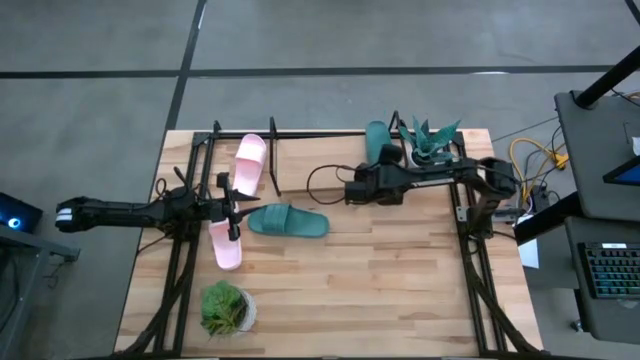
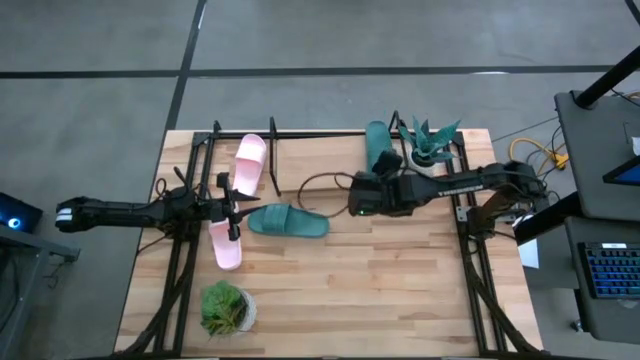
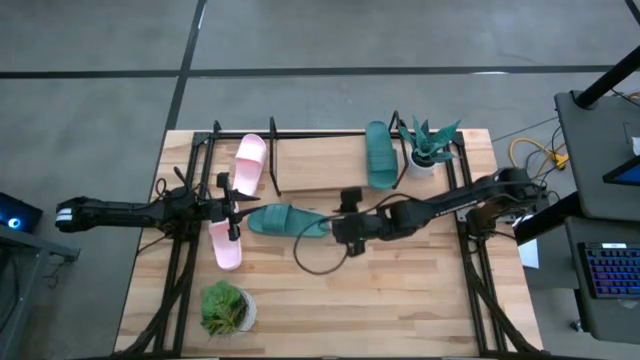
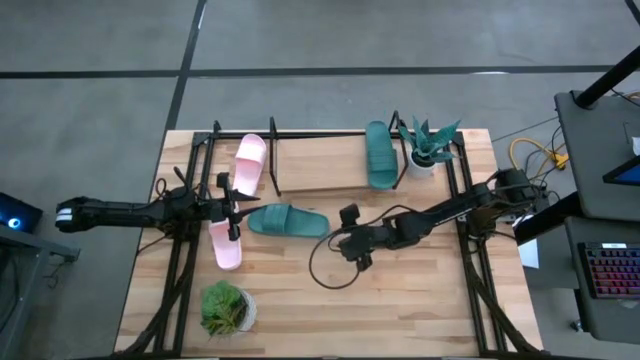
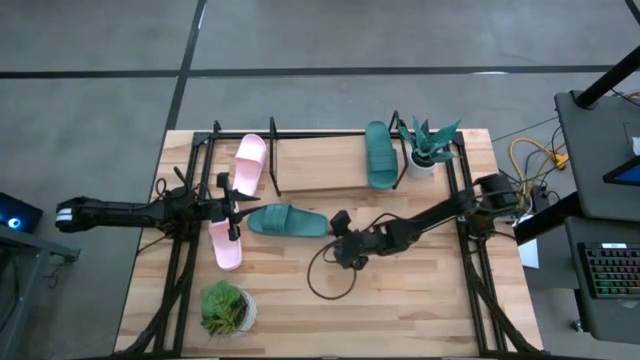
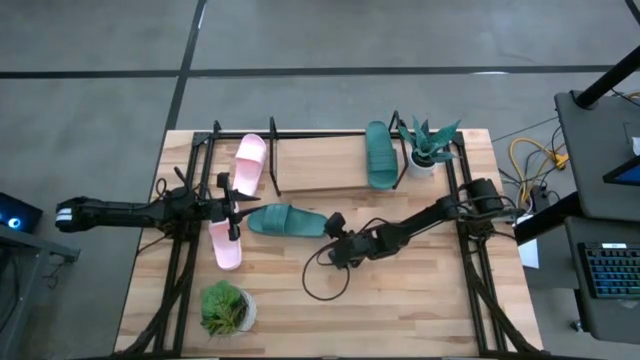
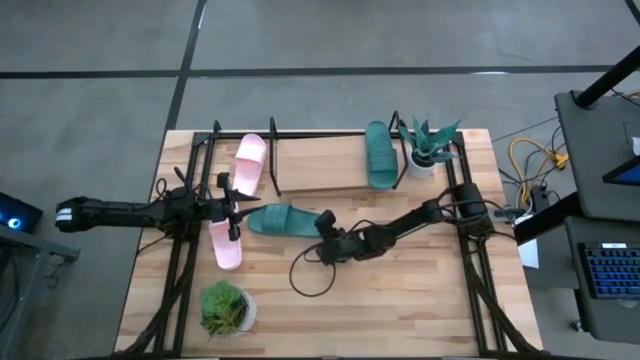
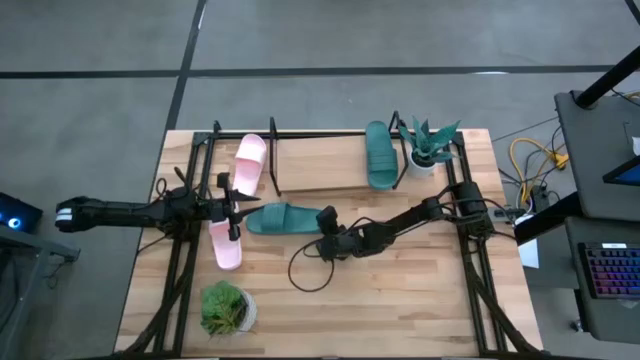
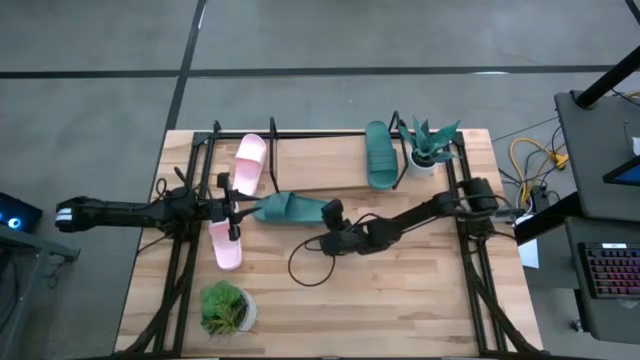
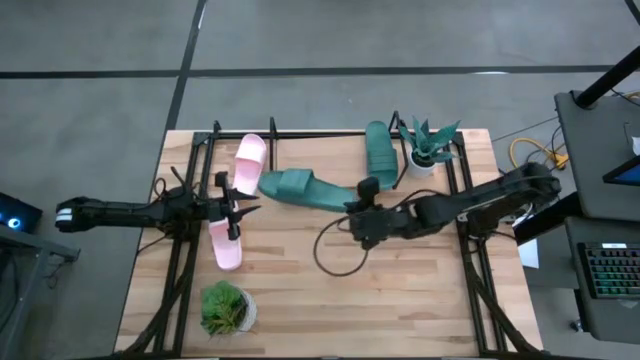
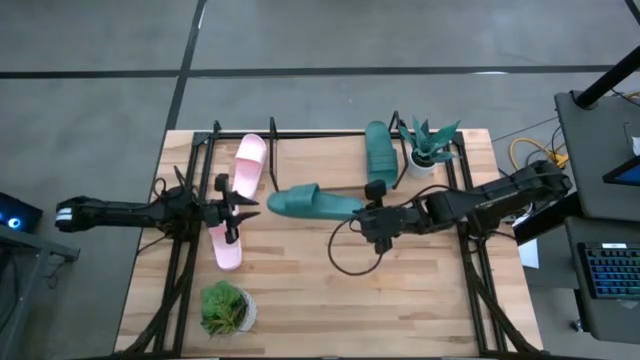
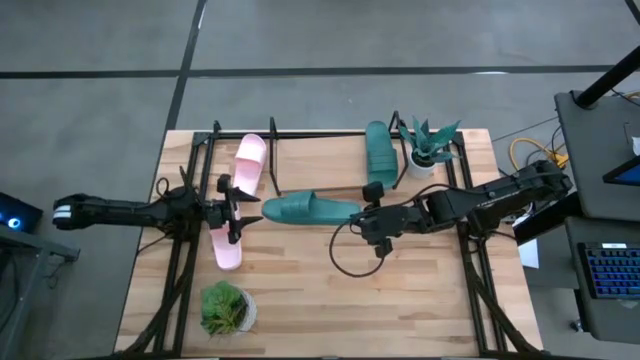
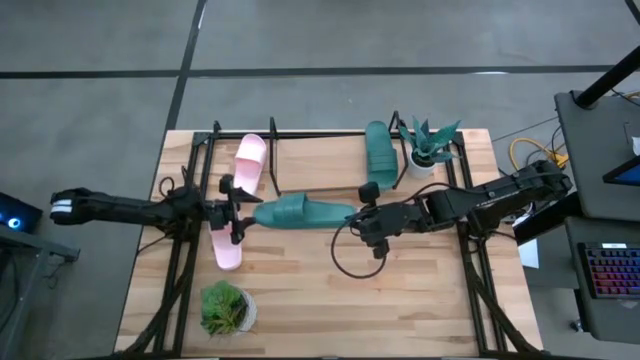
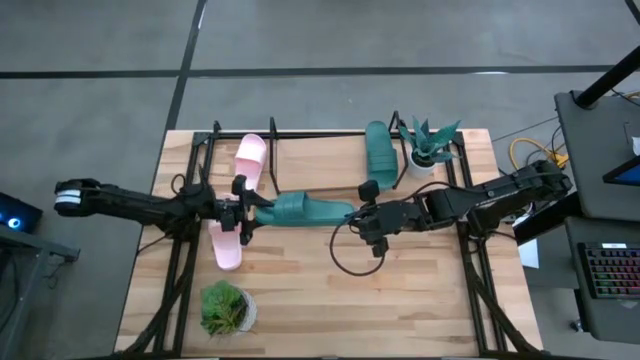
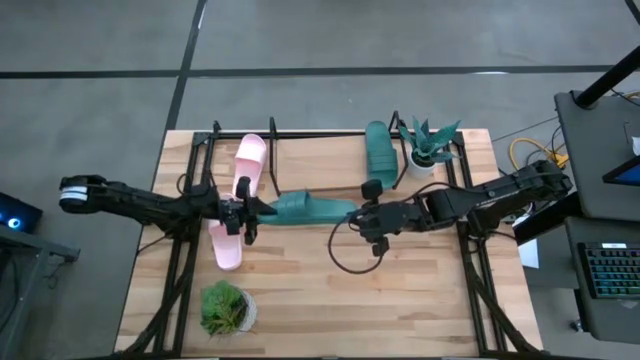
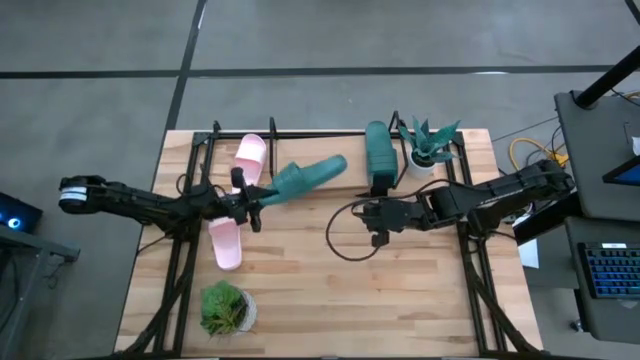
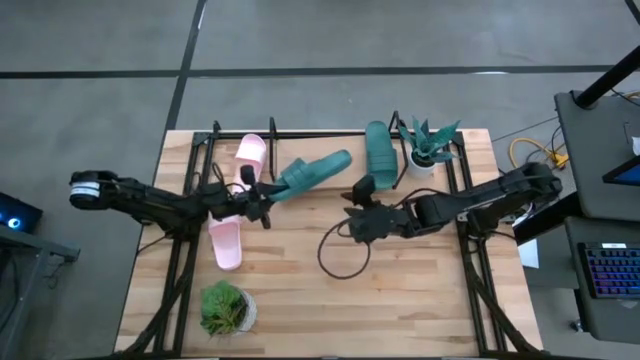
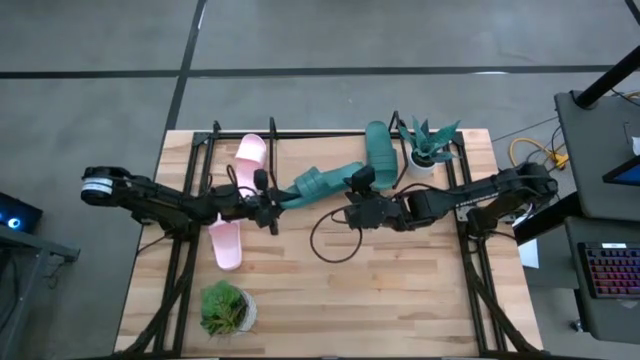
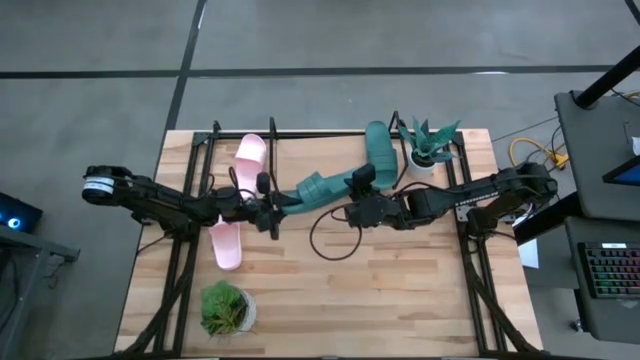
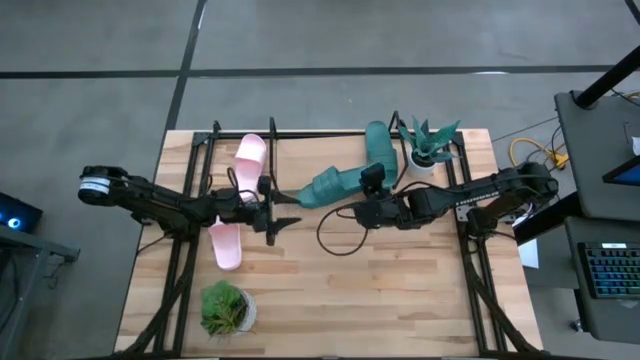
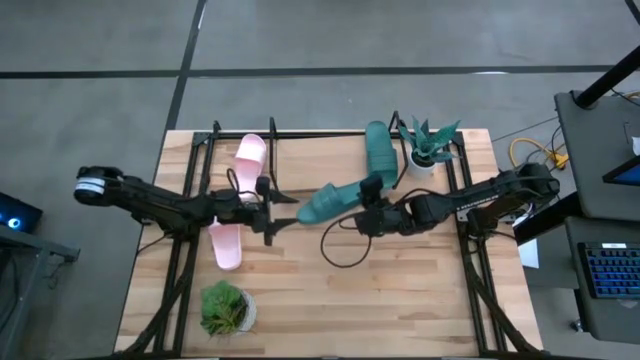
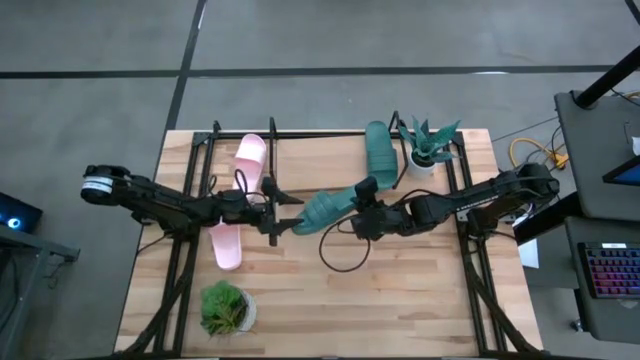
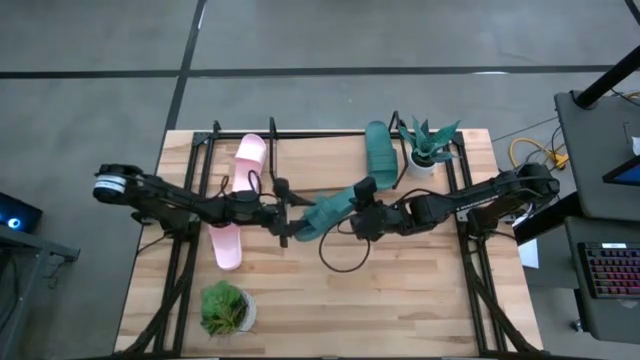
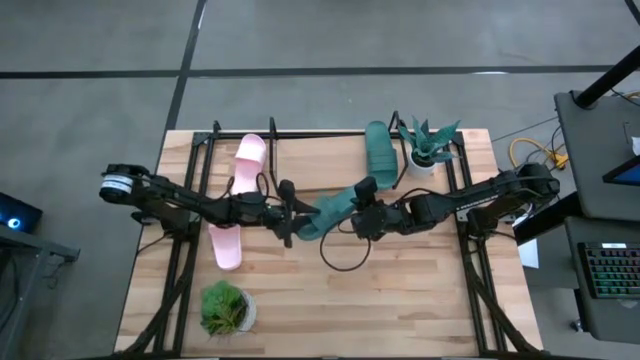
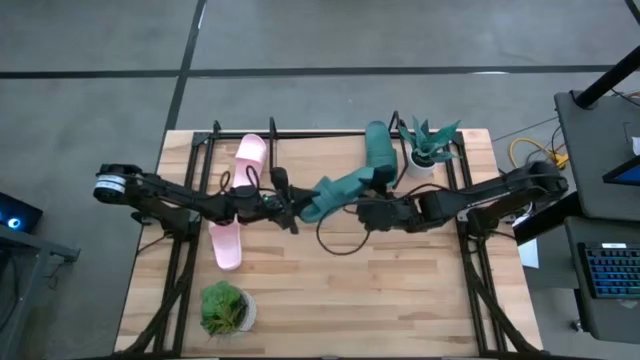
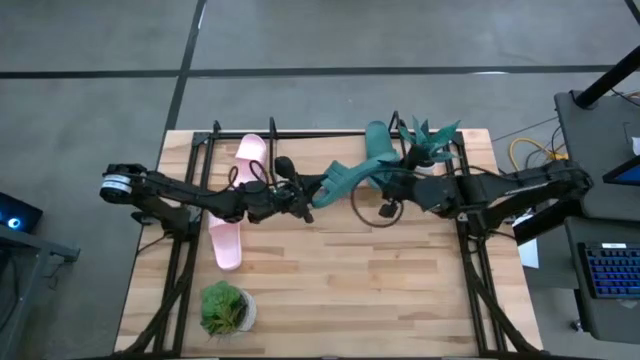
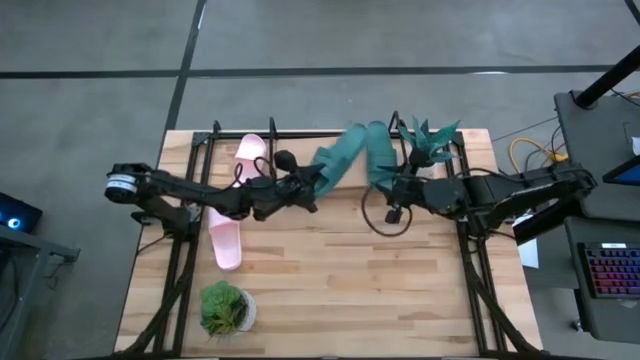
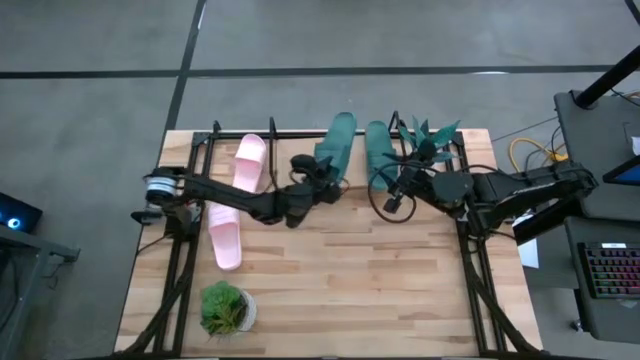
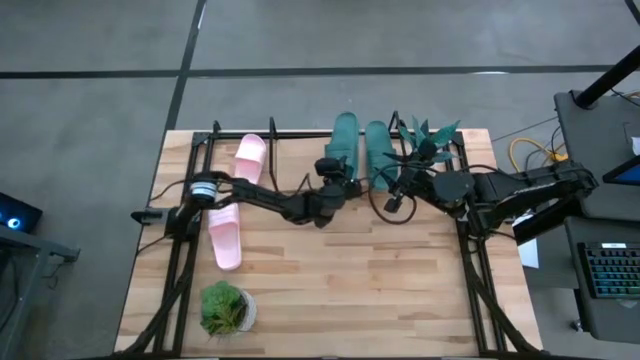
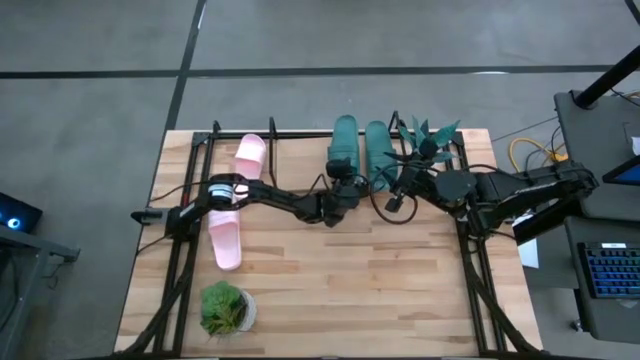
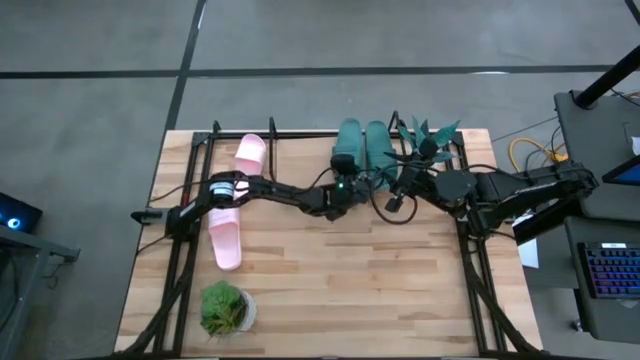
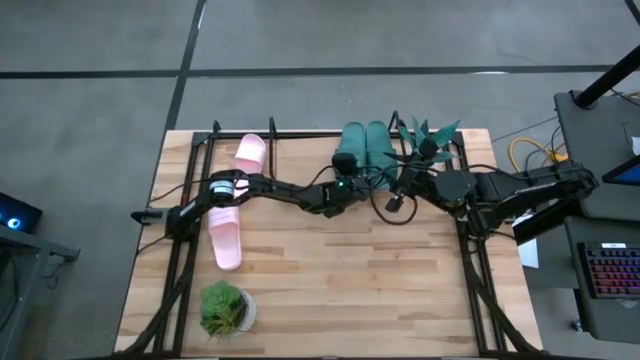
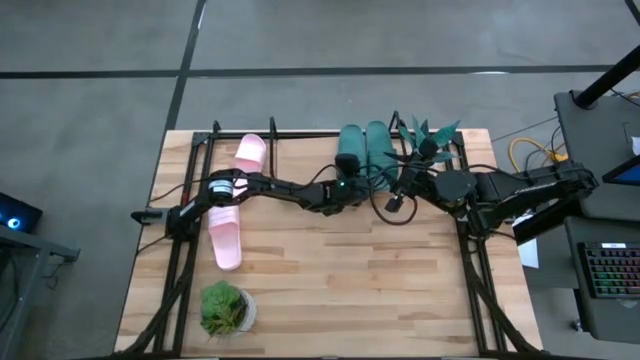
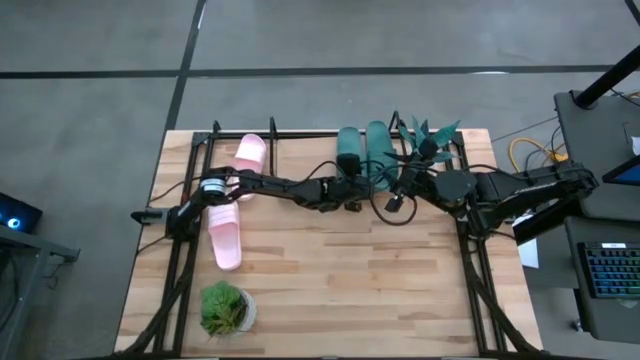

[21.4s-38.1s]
Task: Pick and place slides into the shelf
Put the green slide on the shelf

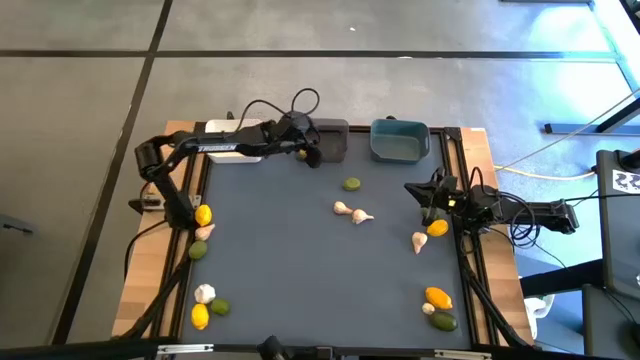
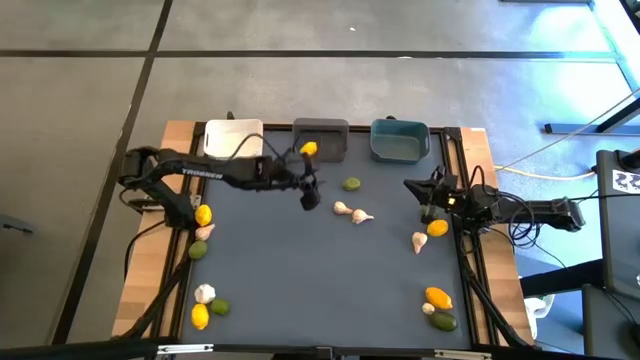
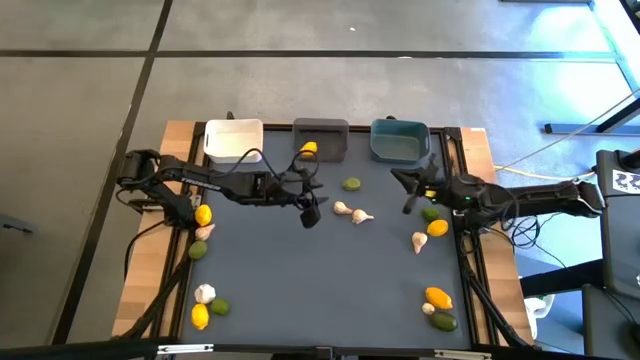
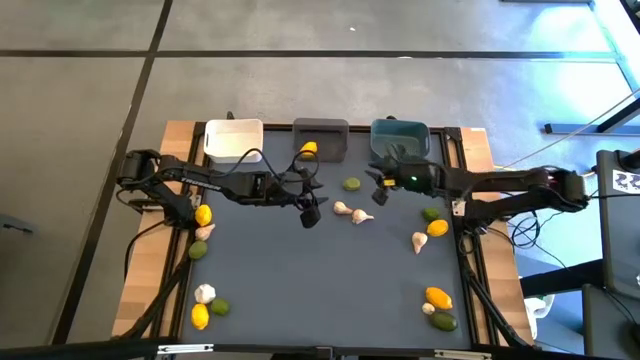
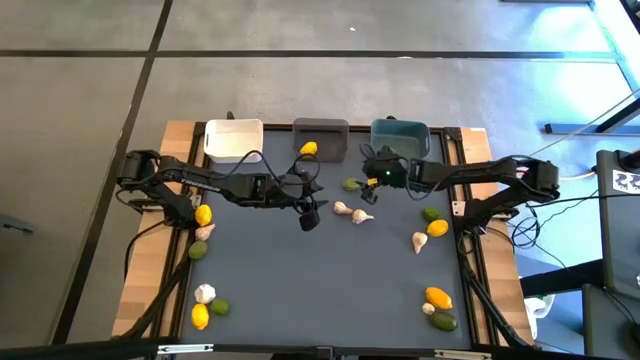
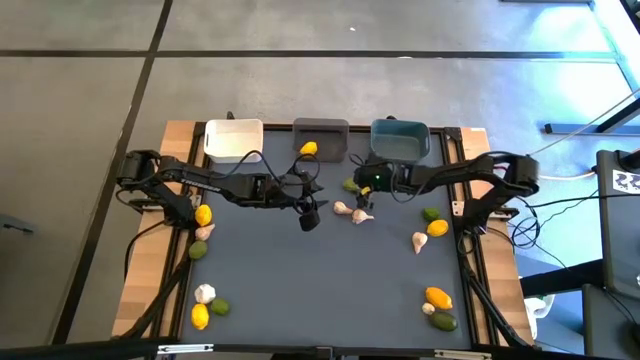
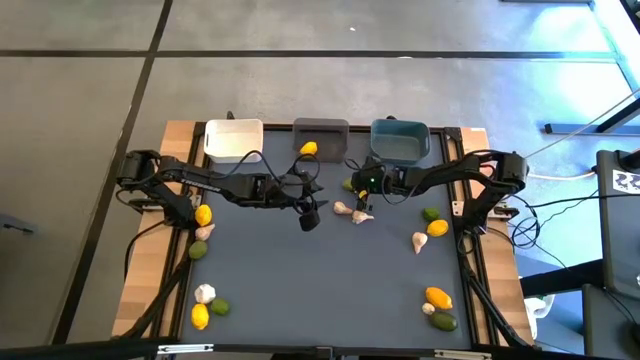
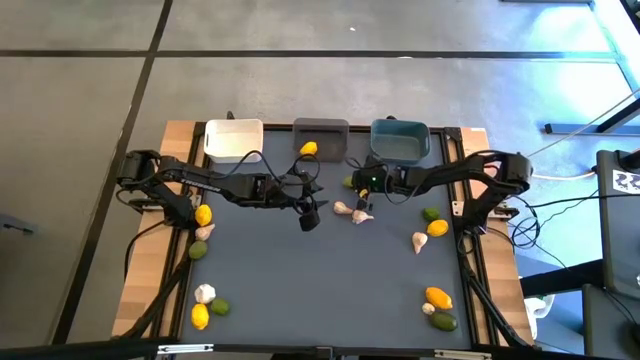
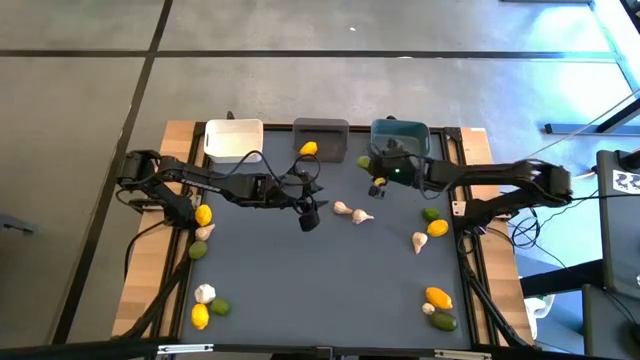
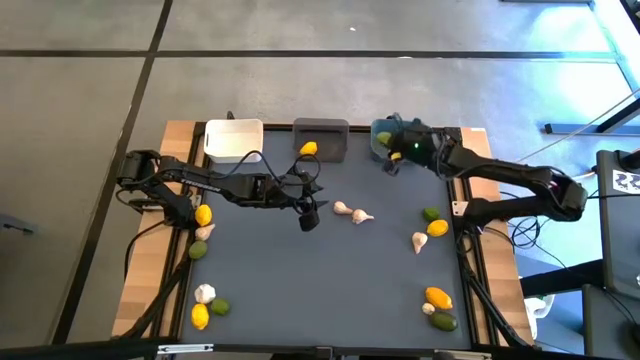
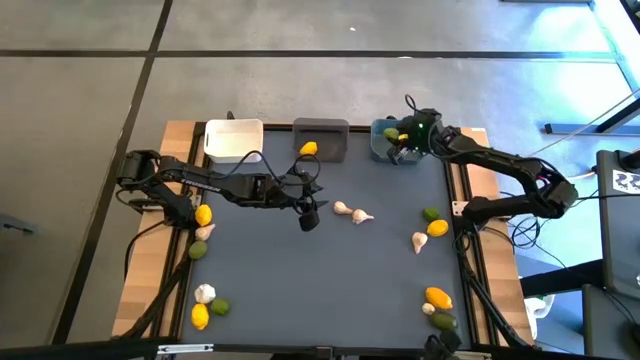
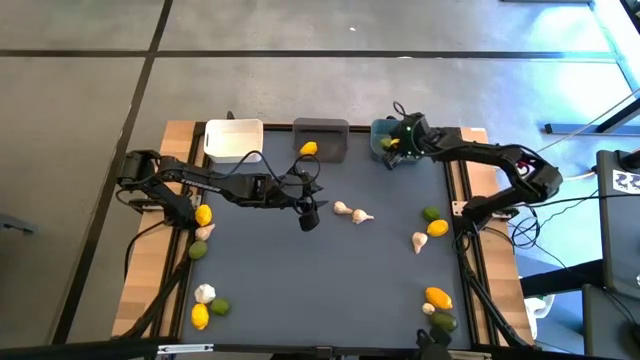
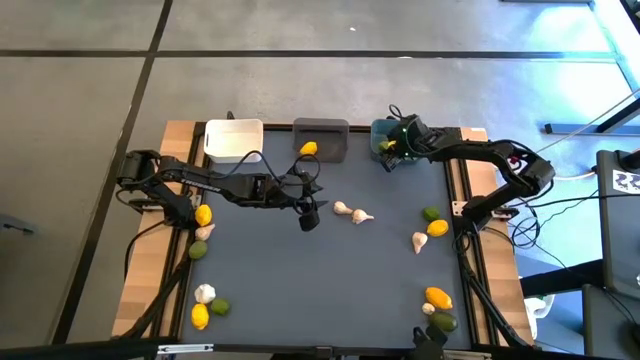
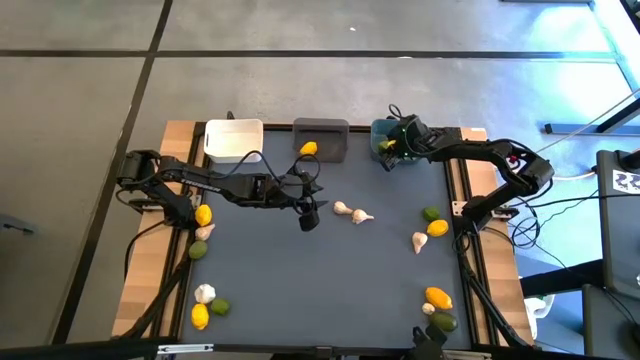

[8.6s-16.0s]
Task: Sort produce into baskets
Put the lime into the blue bin
